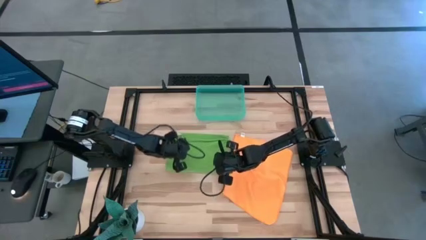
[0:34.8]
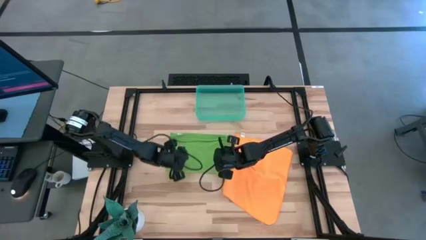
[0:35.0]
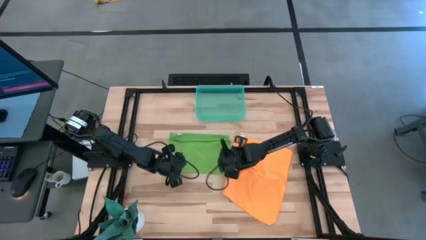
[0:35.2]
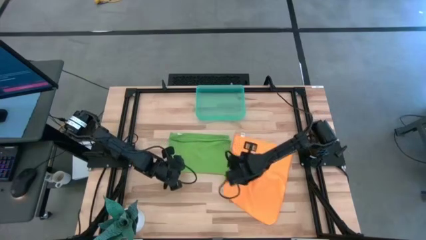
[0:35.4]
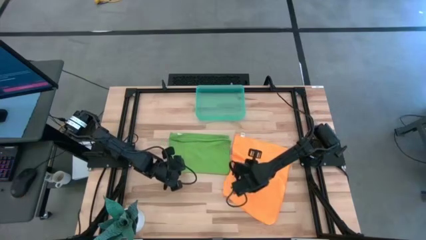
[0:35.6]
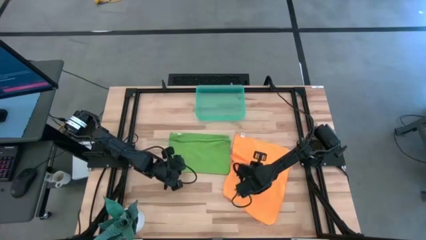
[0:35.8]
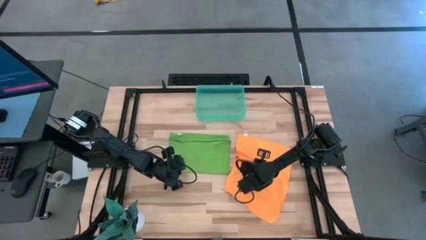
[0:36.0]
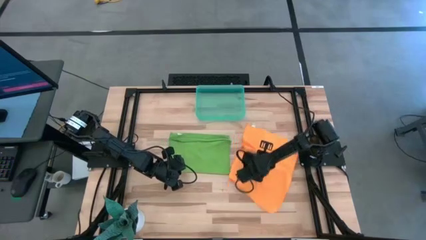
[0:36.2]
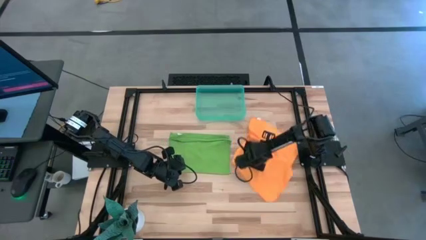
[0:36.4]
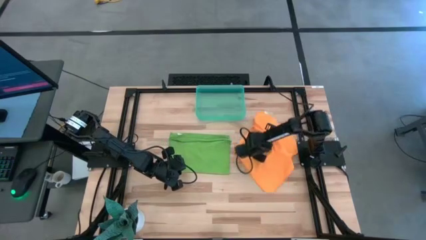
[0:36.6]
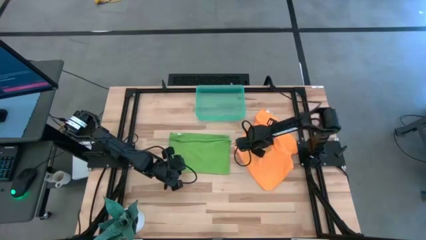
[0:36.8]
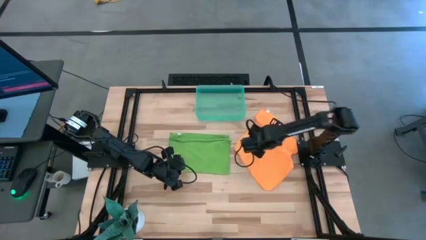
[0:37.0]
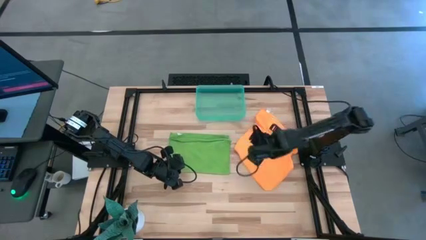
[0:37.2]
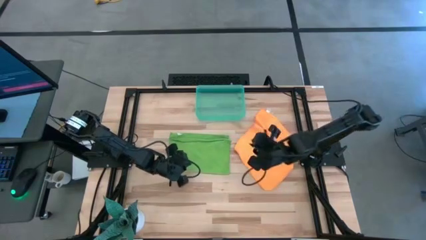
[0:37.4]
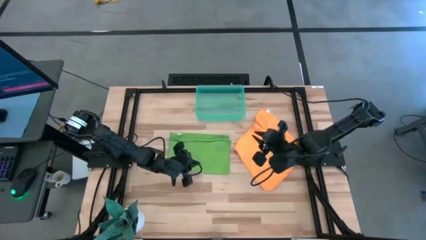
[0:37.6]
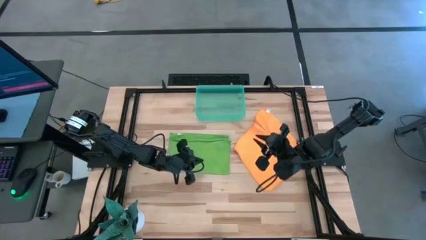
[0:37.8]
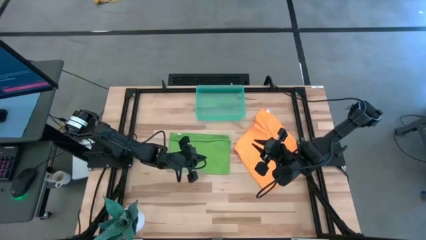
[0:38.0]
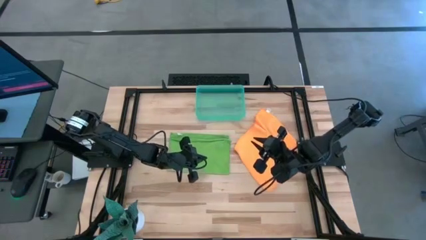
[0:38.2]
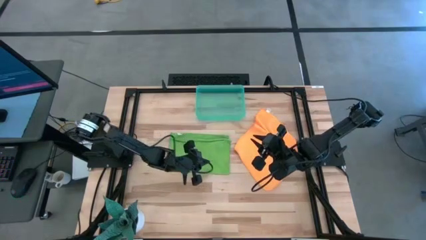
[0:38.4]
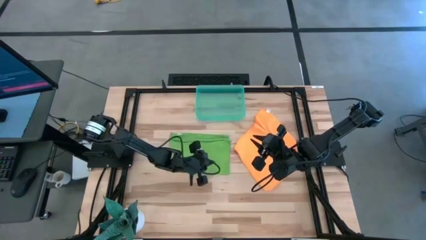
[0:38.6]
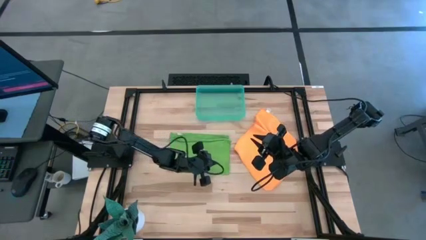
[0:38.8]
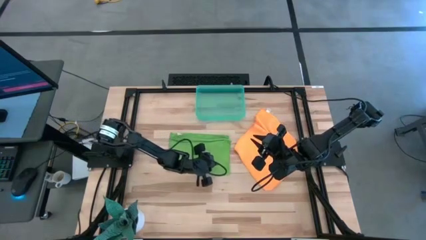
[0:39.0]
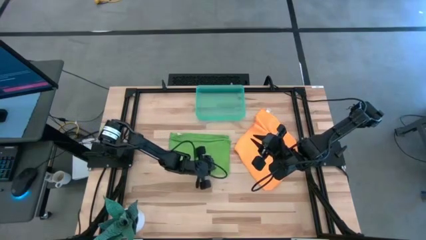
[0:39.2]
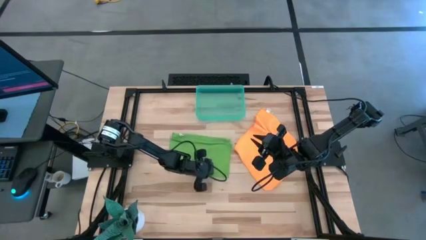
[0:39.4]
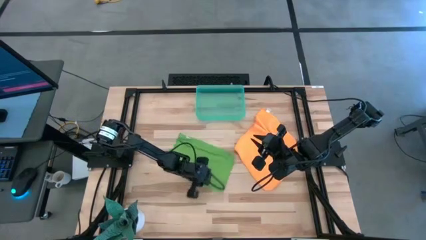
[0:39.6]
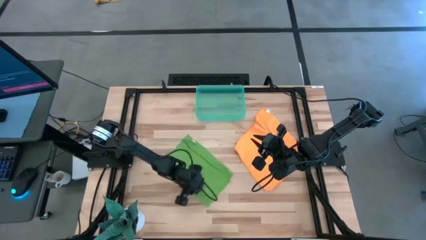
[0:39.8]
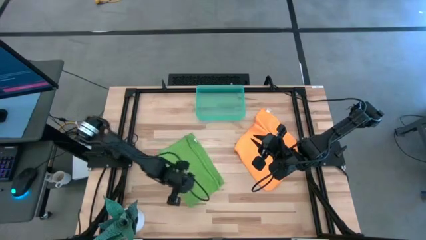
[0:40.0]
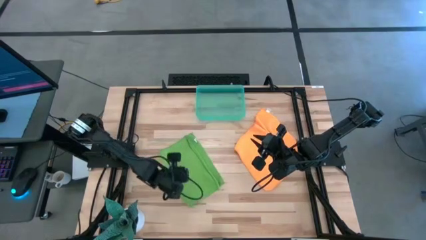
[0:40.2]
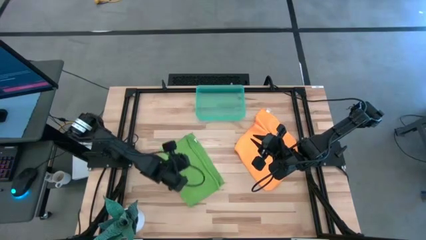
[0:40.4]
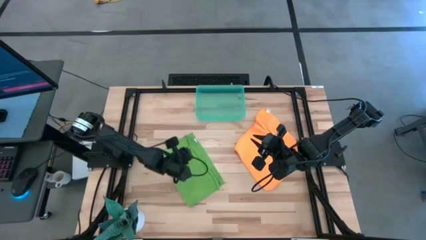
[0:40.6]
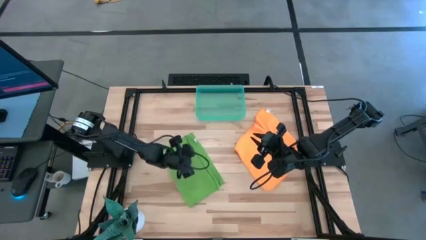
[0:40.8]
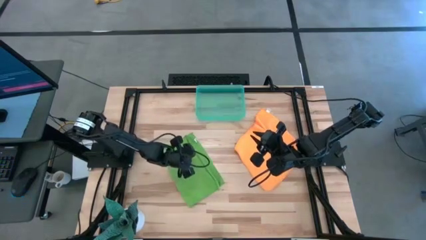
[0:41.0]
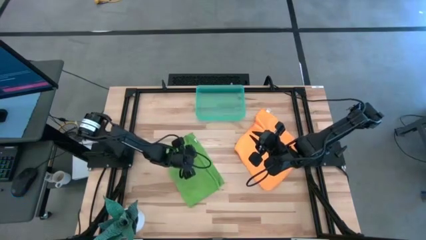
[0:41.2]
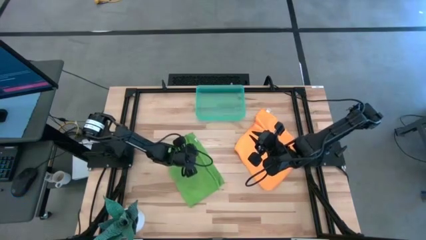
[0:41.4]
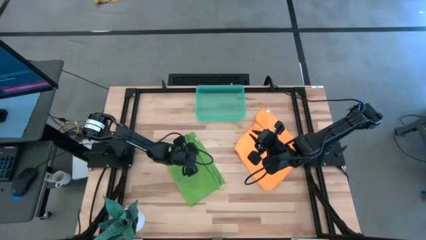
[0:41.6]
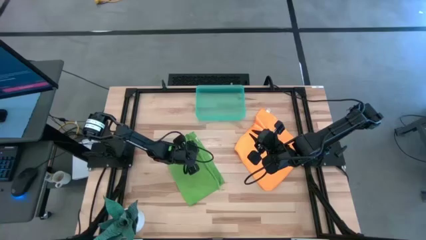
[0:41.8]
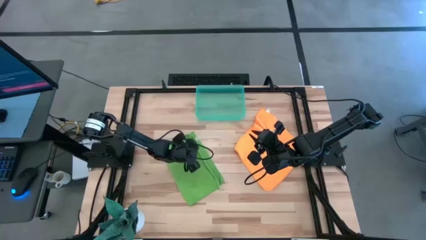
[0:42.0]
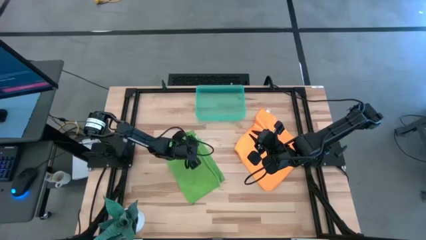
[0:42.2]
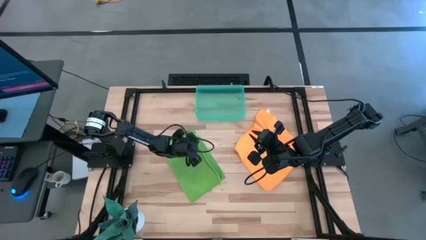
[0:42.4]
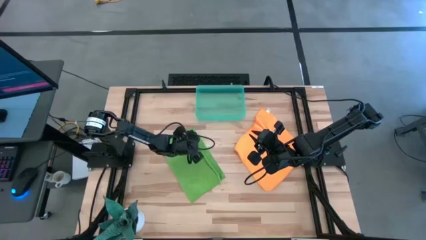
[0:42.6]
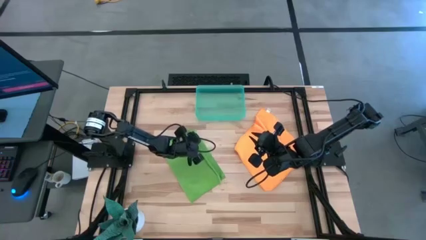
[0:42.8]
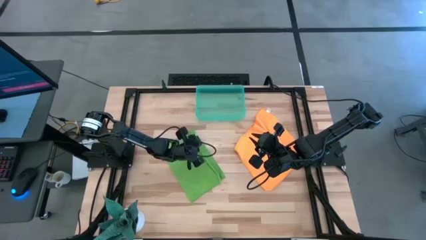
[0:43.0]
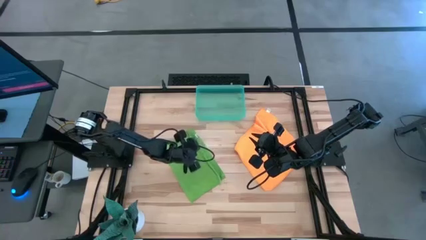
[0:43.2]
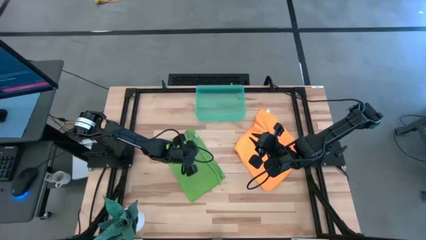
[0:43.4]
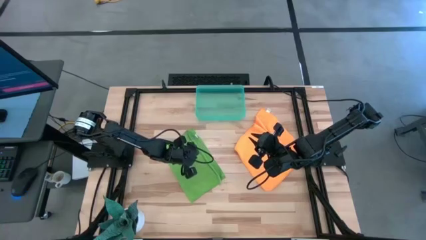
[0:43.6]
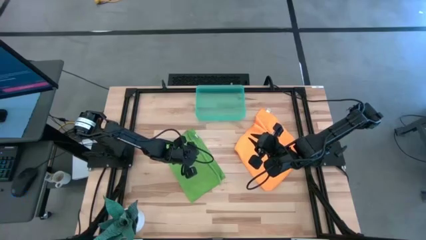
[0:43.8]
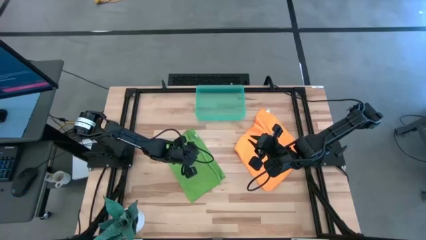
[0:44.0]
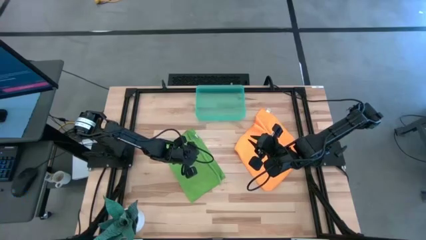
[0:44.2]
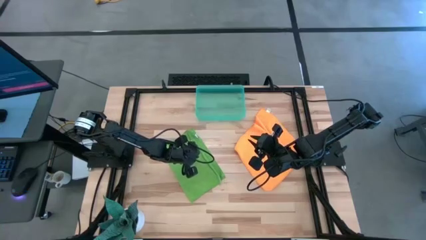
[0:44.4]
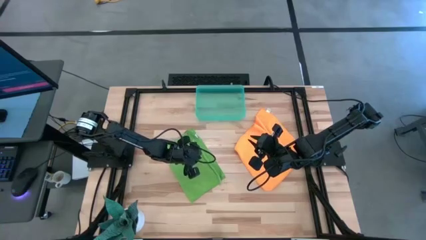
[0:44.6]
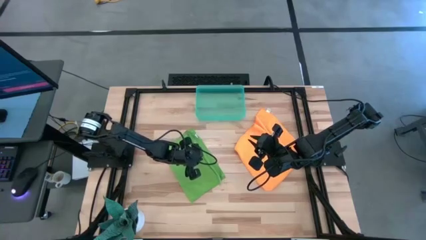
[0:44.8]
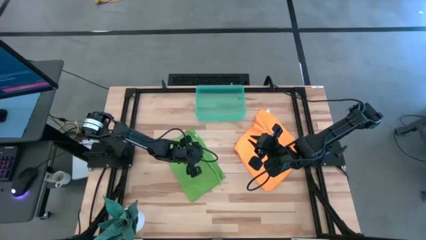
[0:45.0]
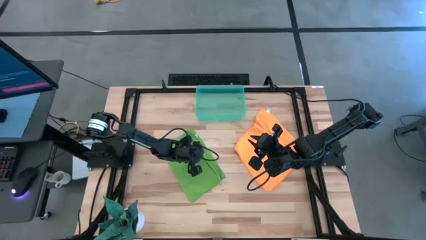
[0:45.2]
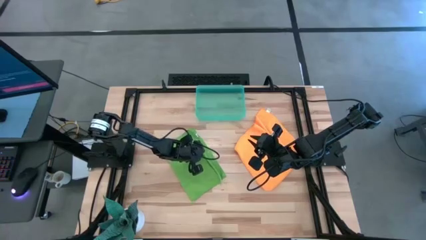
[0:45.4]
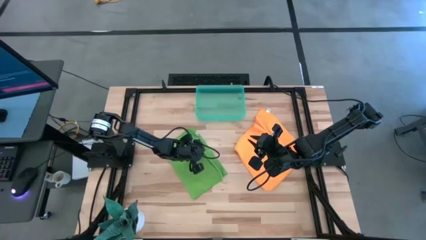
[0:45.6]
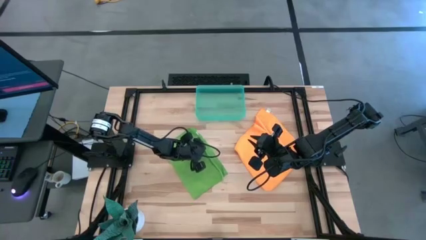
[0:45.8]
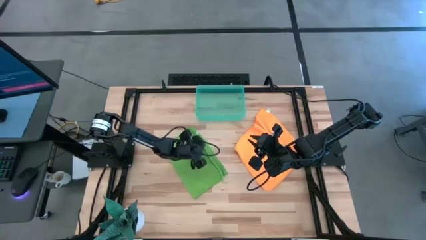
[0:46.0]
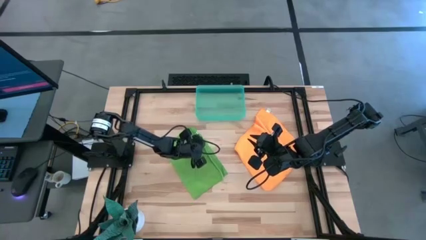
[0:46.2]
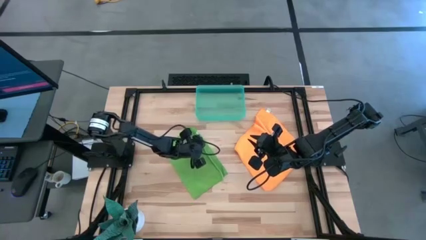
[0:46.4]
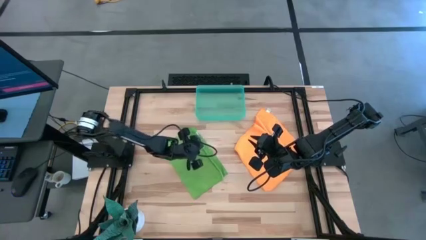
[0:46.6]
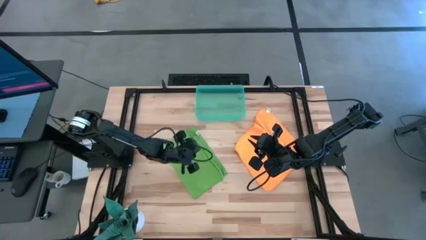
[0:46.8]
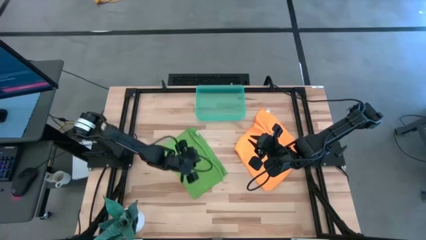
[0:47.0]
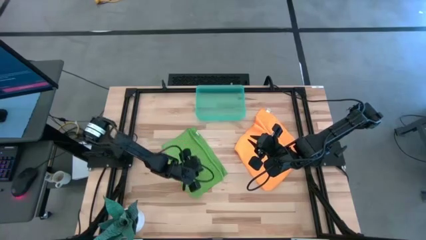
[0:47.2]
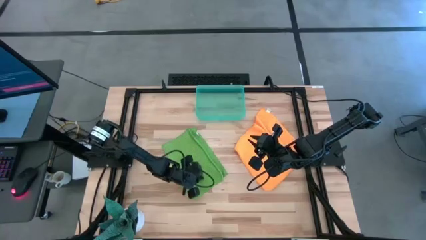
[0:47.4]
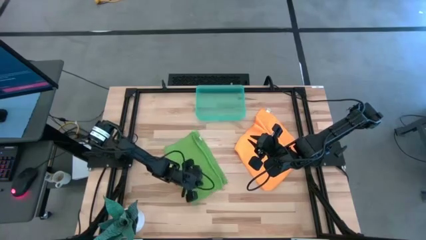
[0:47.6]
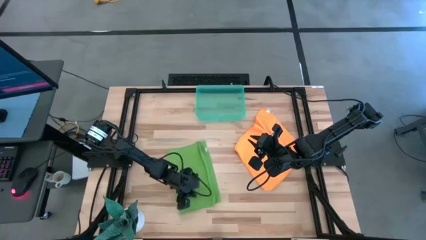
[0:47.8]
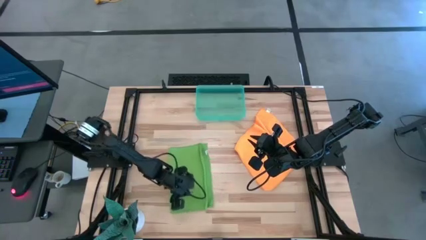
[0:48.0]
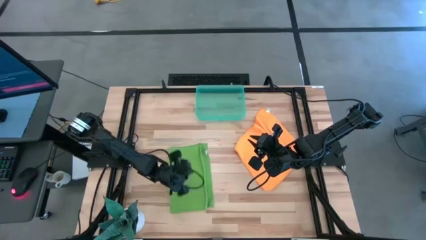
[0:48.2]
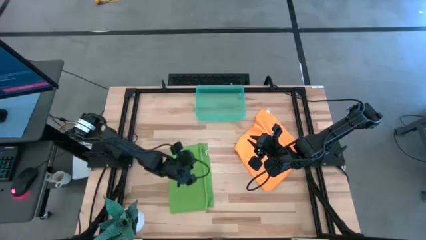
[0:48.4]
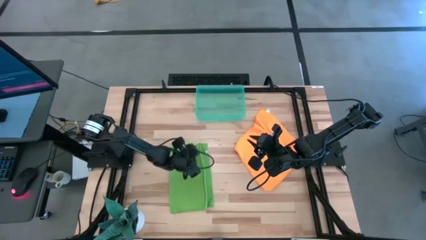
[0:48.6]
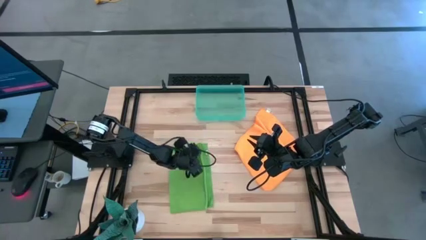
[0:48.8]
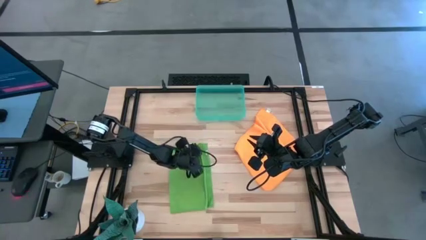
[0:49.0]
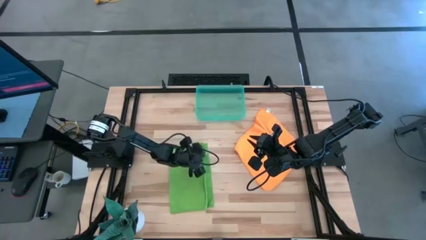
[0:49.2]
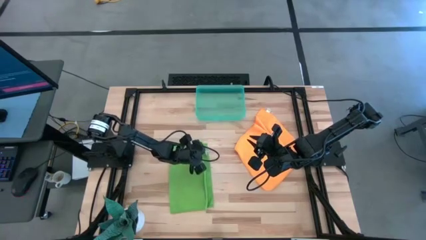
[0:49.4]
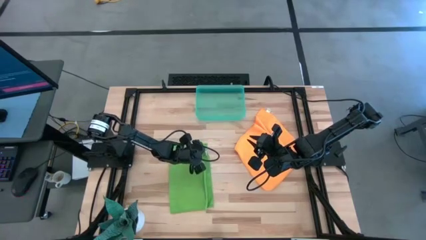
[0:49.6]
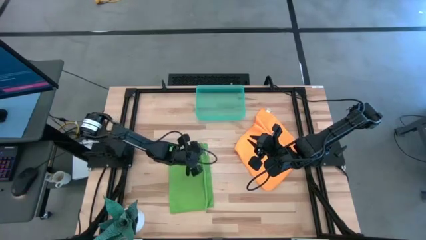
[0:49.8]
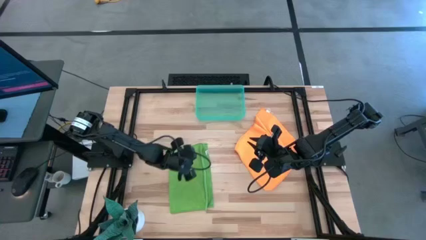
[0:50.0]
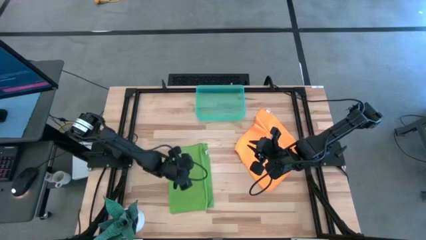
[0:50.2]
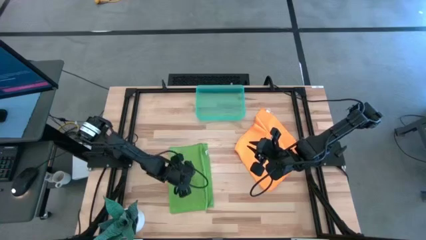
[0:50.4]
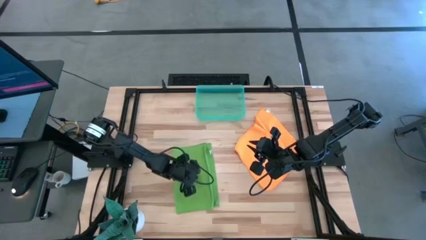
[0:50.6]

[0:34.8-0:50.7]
Task: Roll microfiber towels into tight, uniform cylinder then place into a basket
Fold the green microfiber towel
